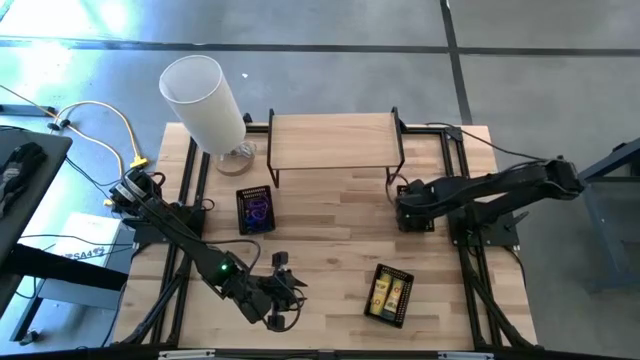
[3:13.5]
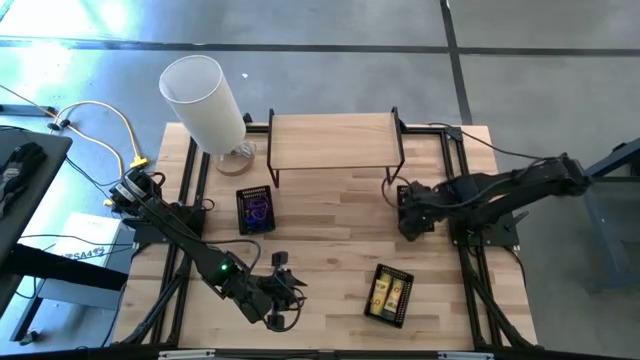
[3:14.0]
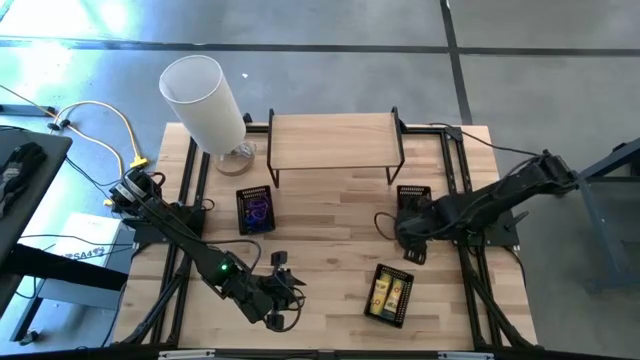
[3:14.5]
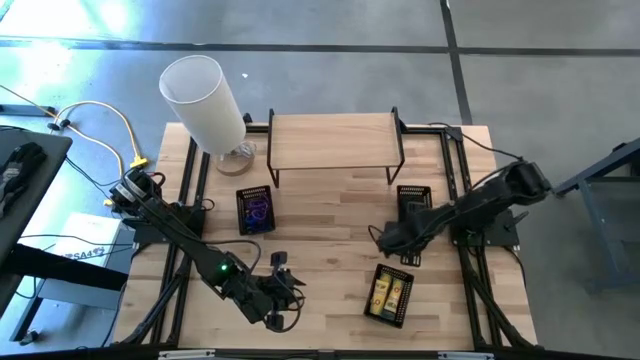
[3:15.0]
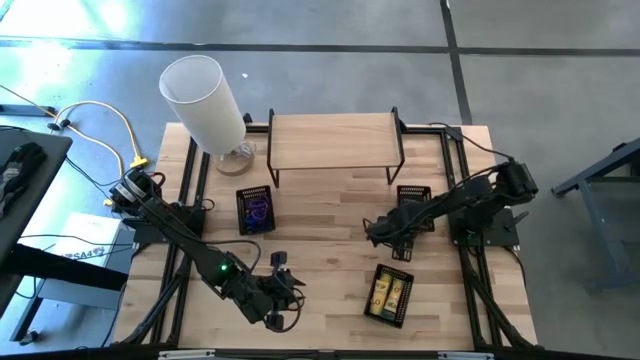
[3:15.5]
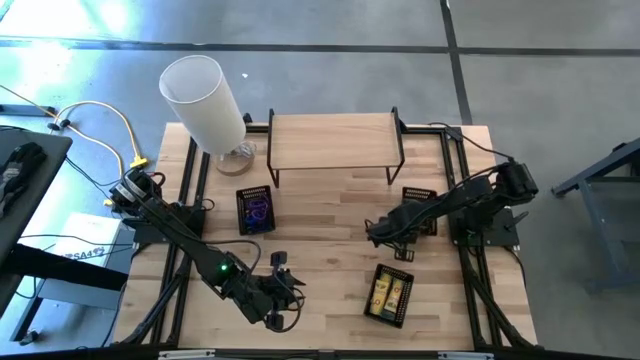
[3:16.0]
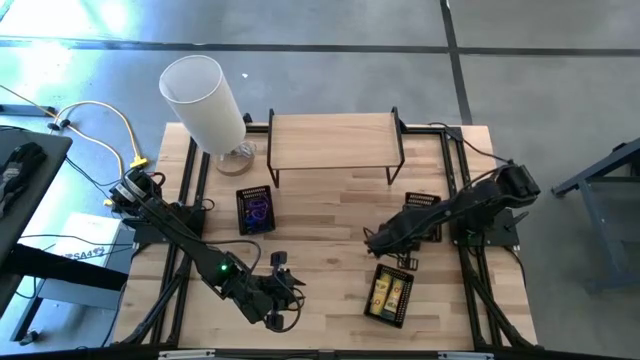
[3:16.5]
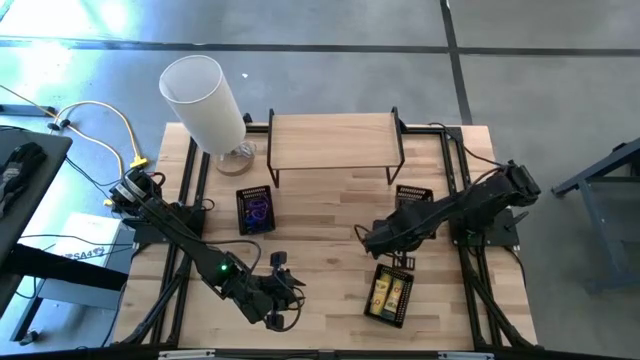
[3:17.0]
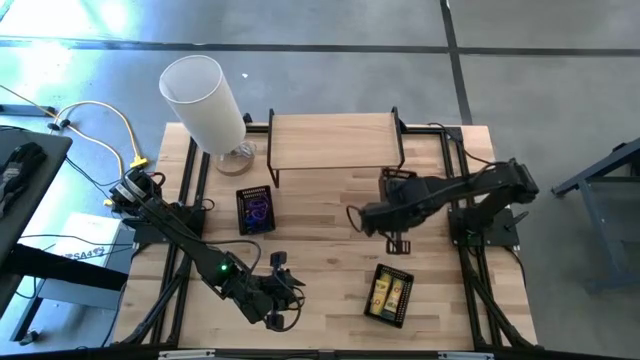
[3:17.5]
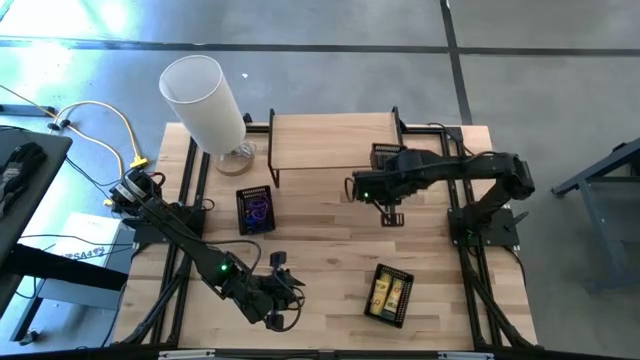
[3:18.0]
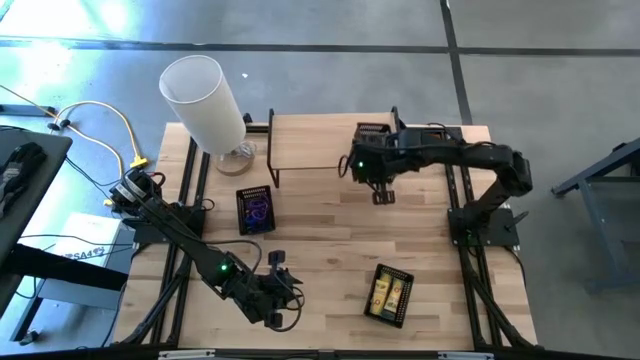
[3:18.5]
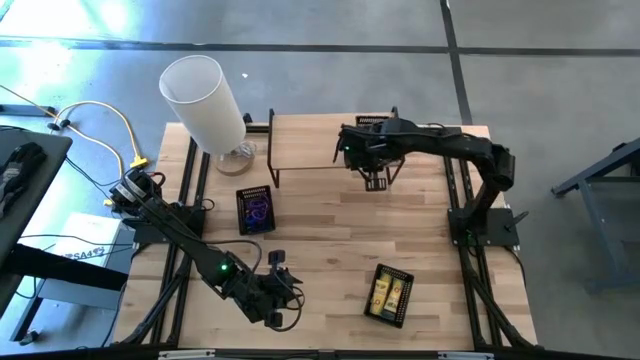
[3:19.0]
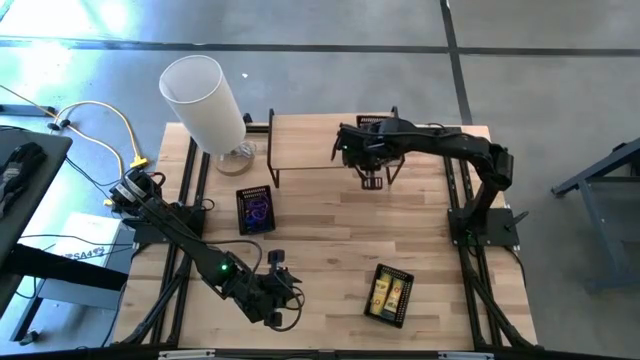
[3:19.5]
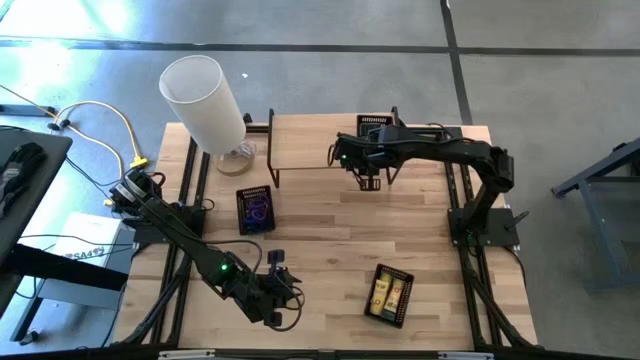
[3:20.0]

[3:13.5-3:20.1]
Task: Pick & Place Office Desk Supplies
Put the top right bin onto the shelf

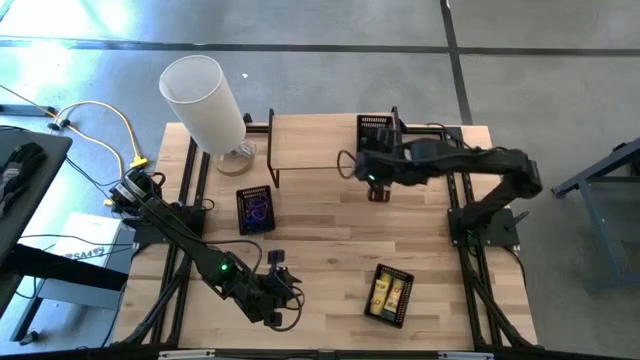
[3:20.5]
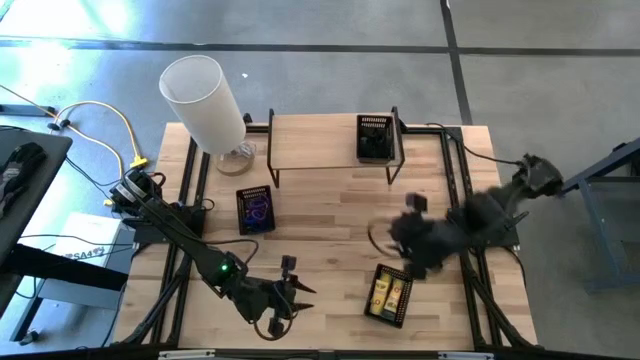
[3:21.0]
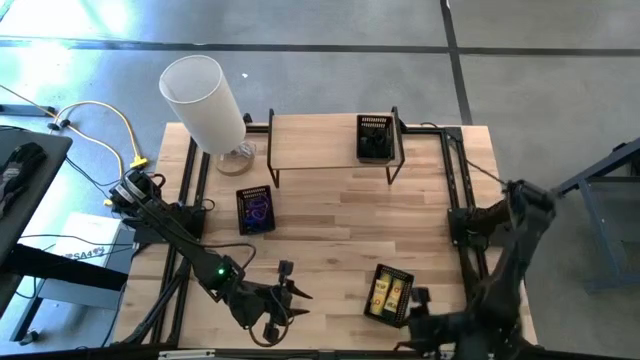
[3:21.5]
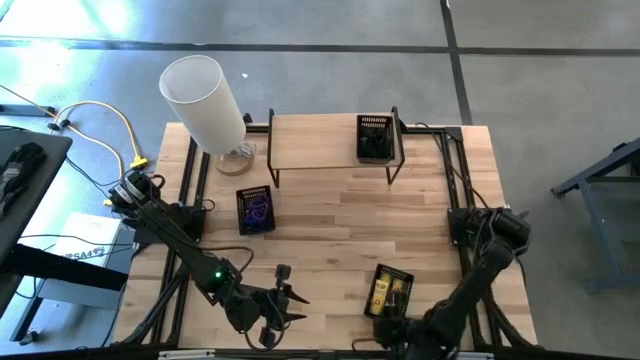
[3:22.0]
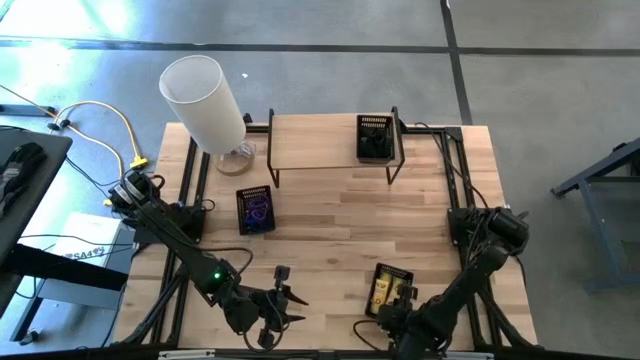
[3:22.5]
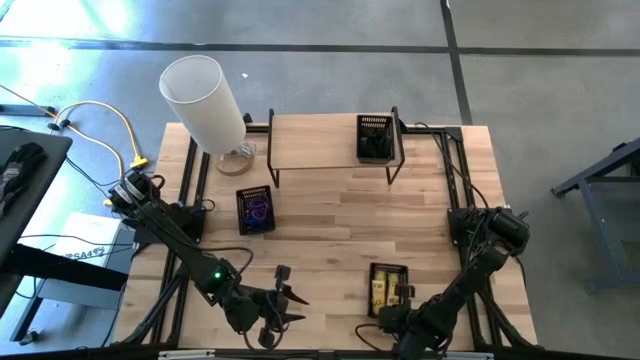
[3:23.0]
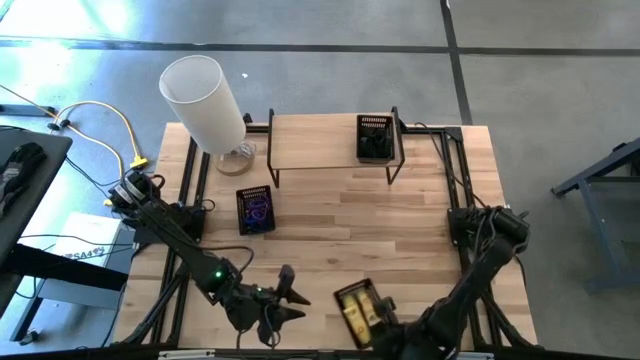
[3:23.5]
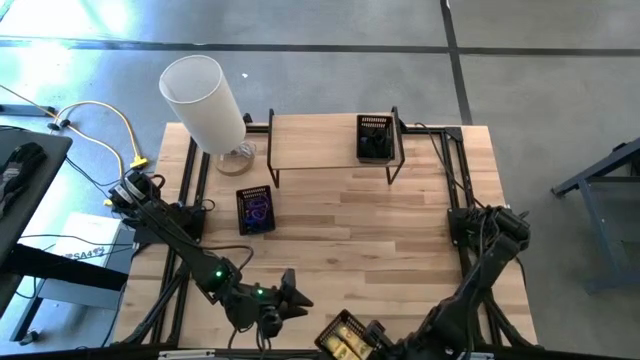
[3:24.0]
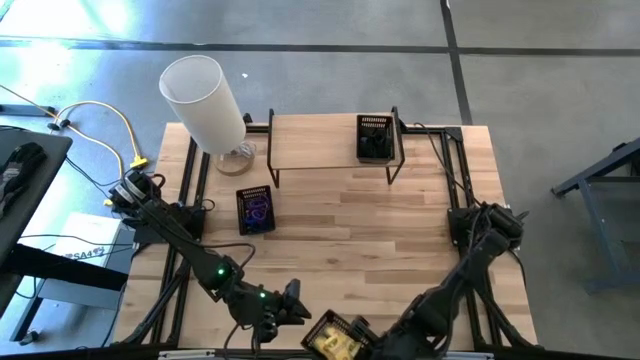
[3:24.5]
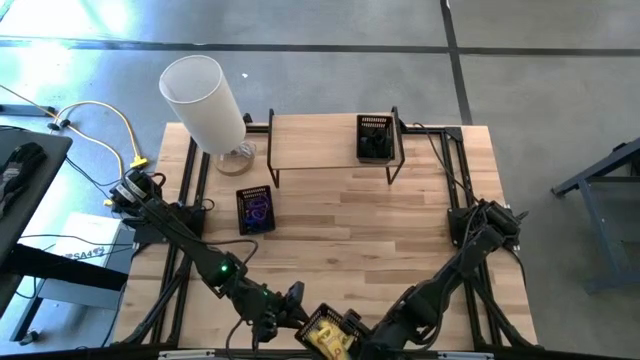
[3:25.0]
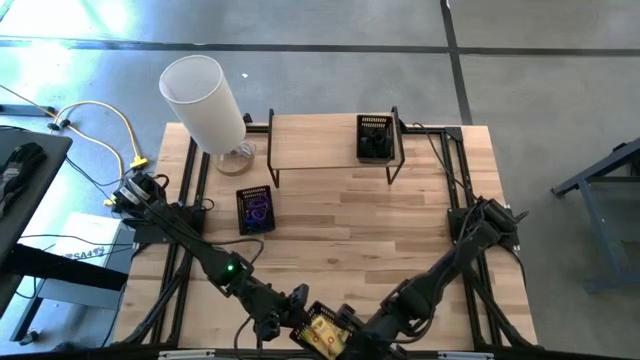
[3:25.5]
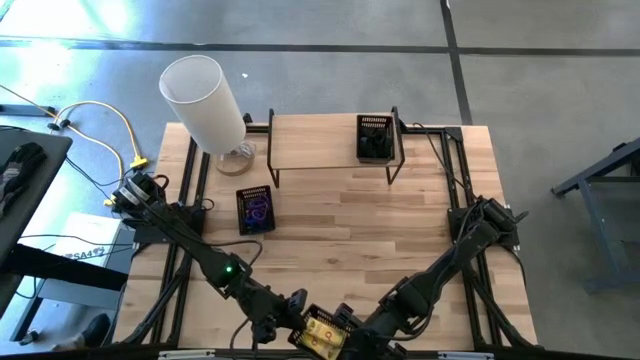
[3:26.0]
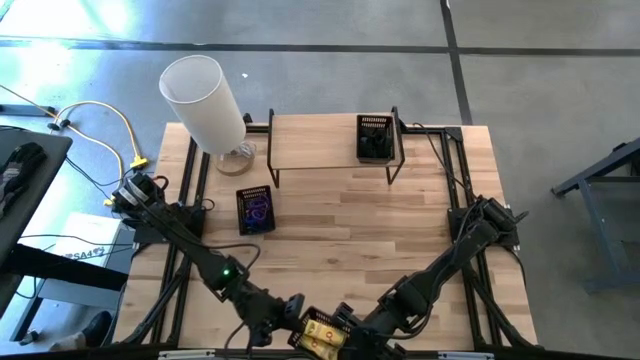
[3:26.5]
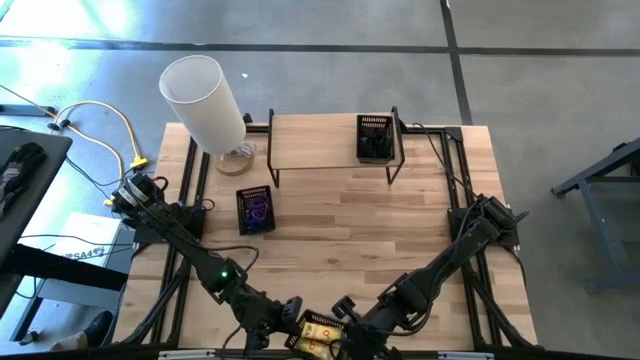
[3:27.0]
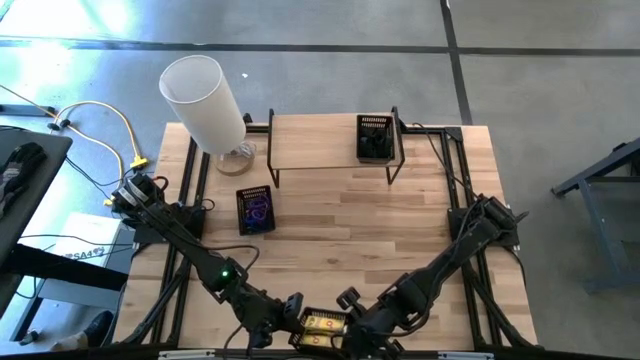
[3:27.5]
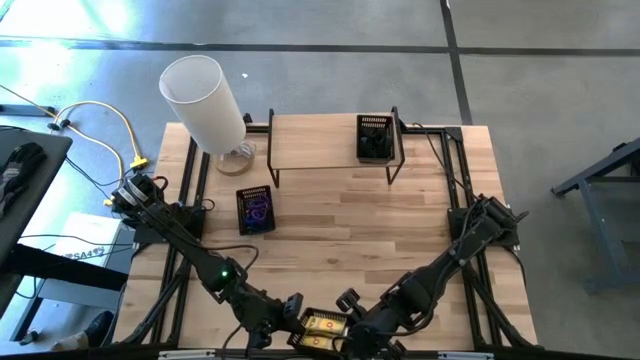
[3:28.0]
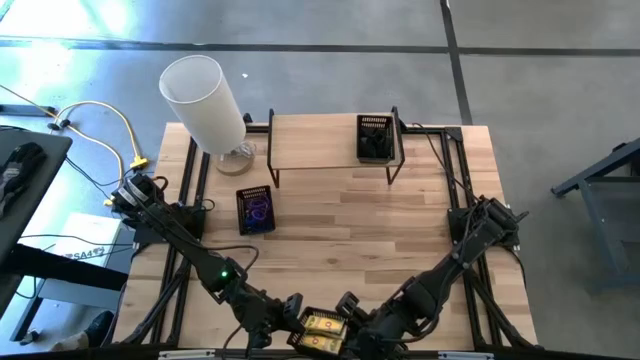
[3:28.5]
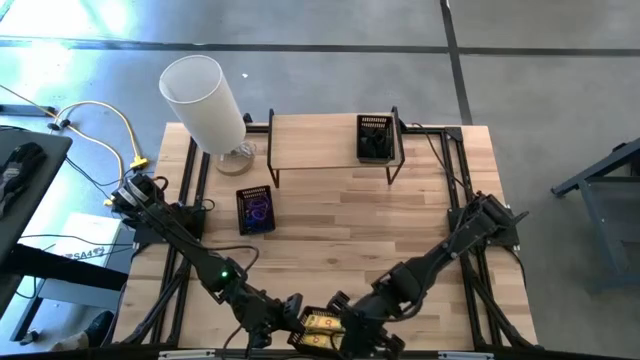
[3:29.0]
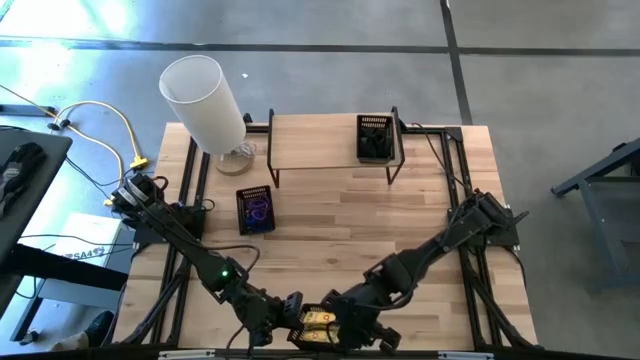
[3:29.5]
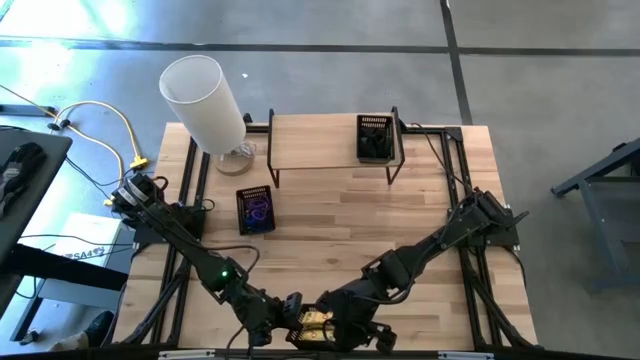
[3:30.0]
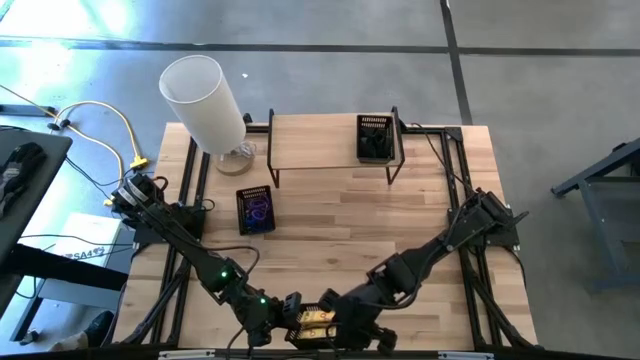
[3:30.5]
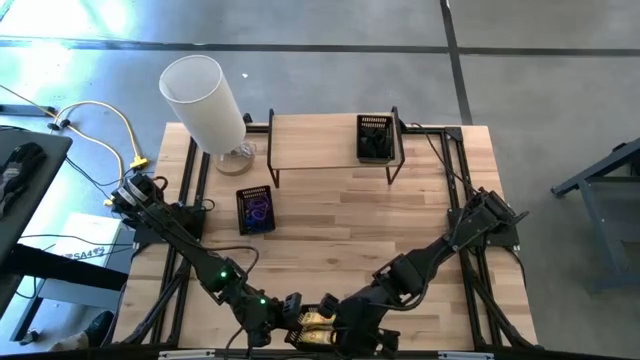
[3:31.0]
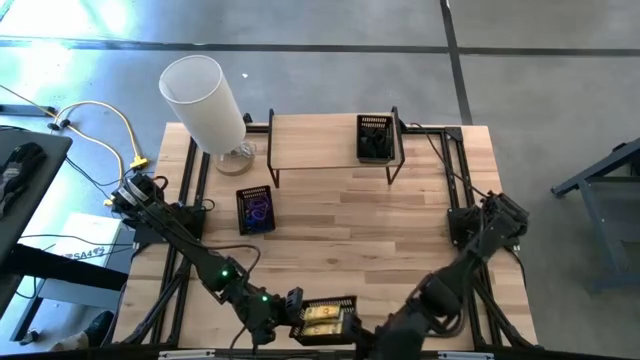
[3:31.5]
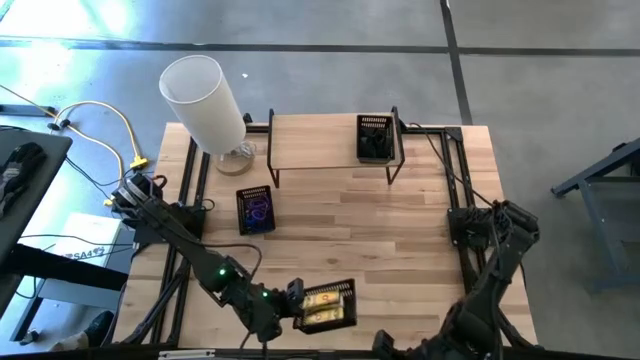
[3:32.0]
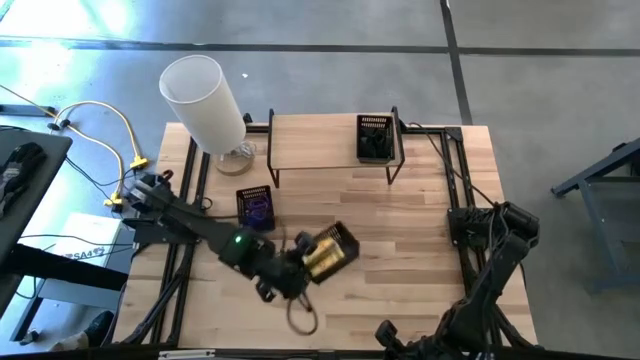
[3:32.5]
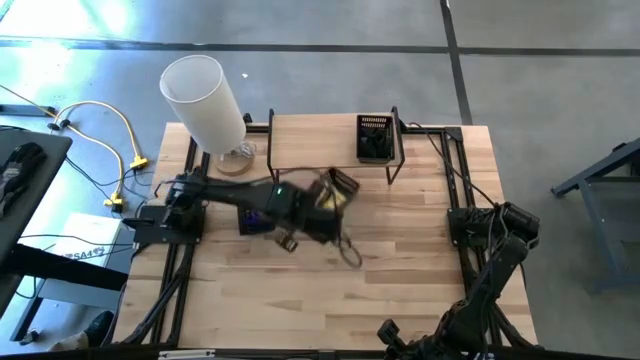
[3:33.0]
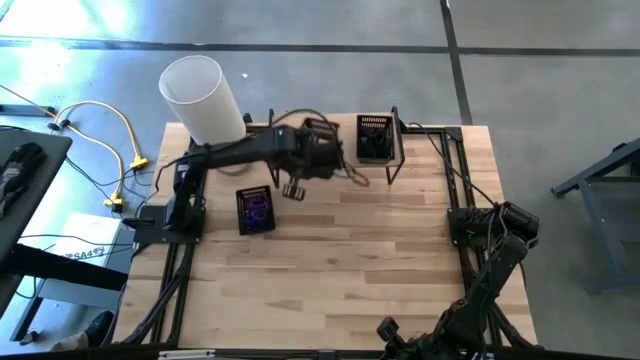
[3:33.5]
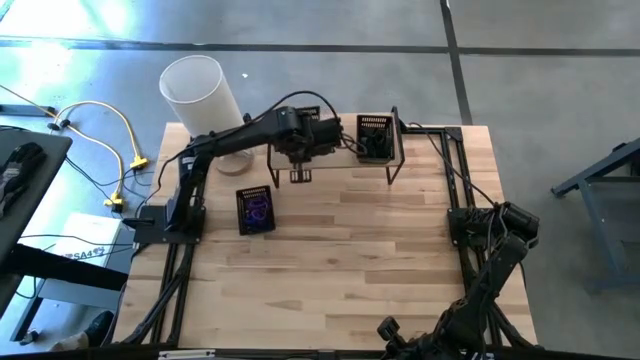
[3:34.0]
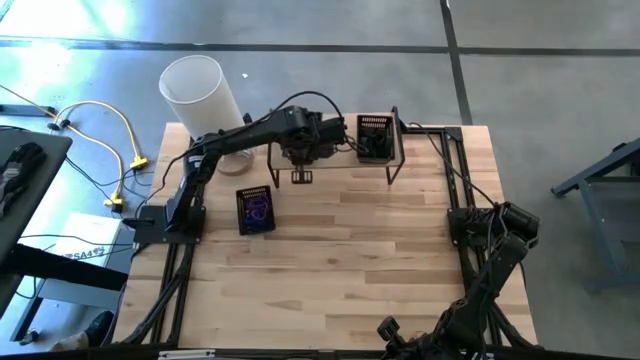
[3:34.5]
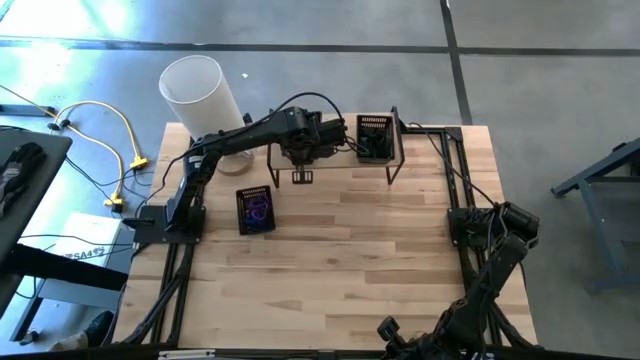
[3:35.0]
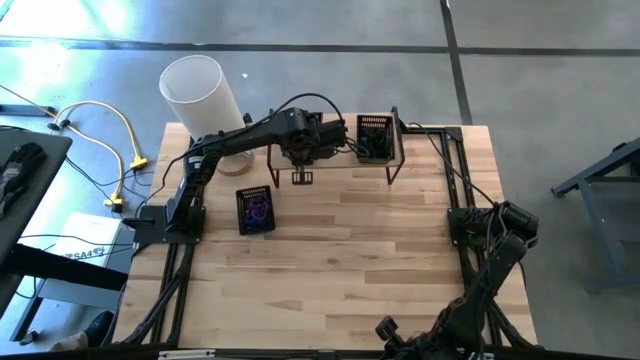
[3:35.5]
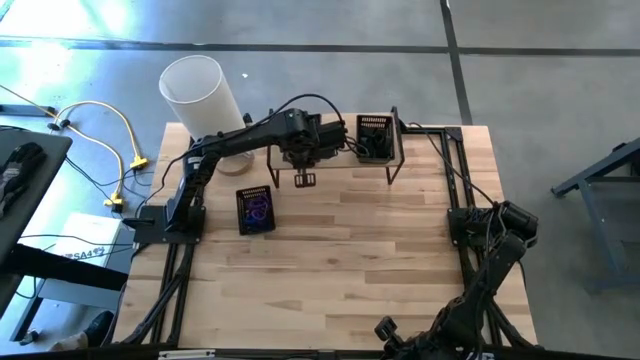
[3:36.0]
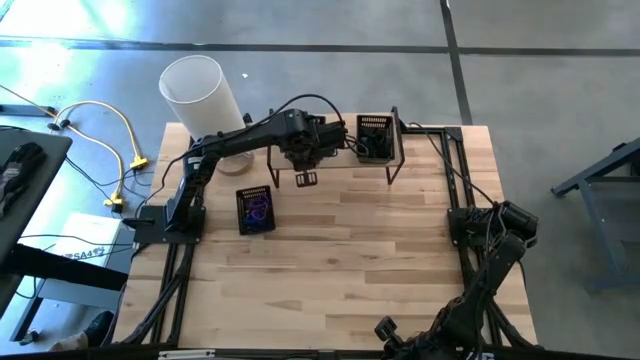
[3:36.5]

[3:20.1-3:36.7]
Put the bottom bin onto the shelf
